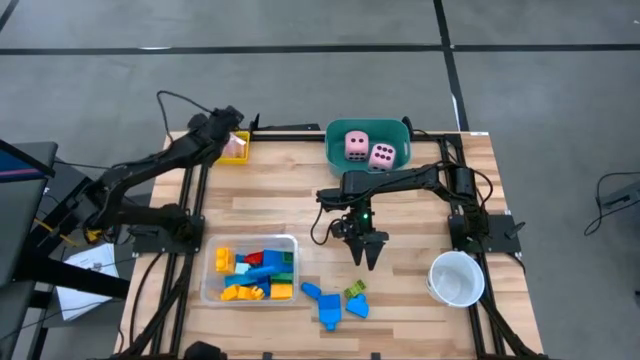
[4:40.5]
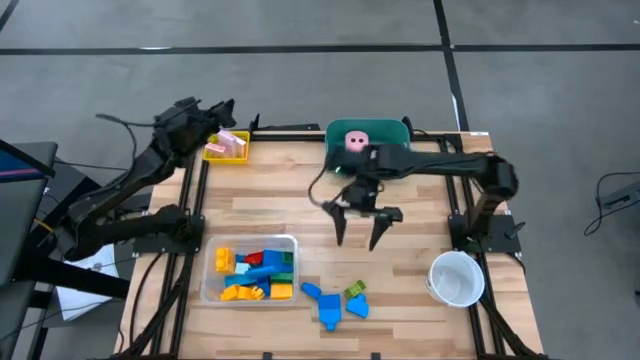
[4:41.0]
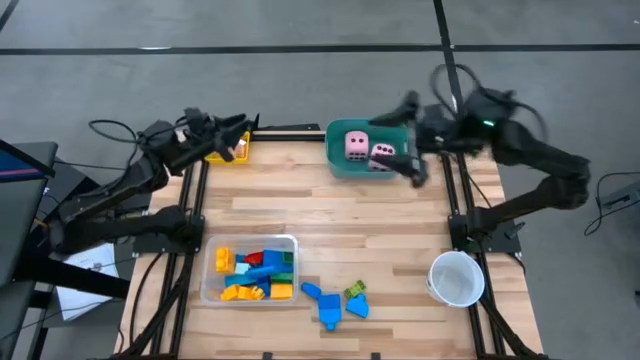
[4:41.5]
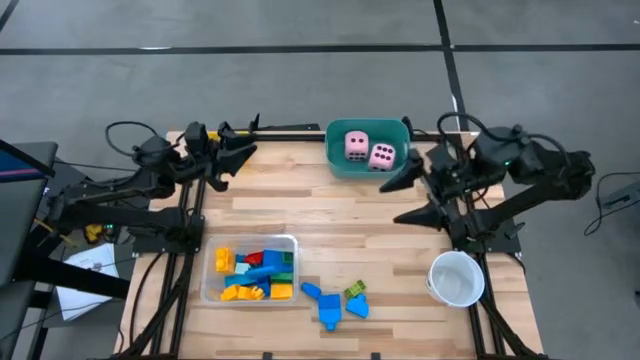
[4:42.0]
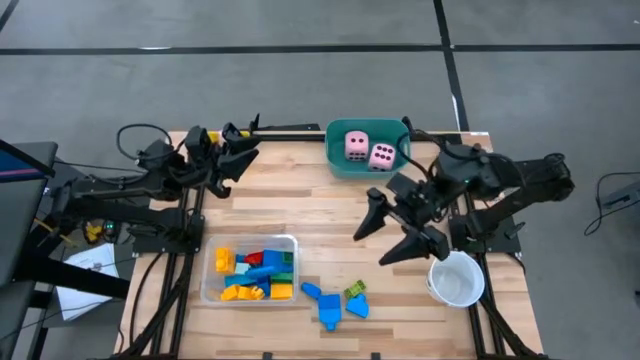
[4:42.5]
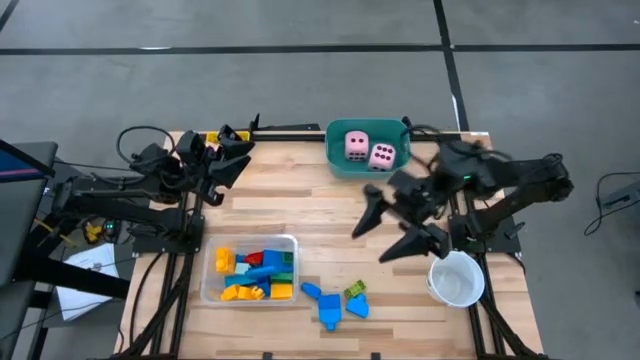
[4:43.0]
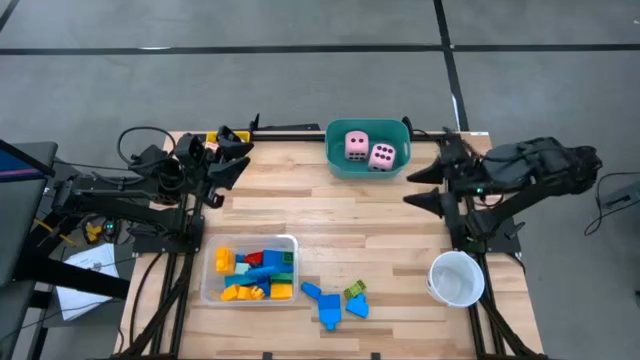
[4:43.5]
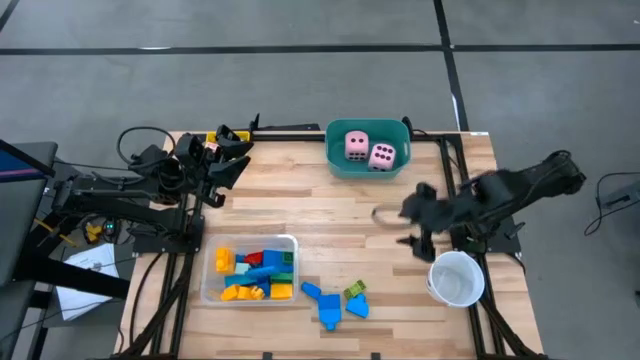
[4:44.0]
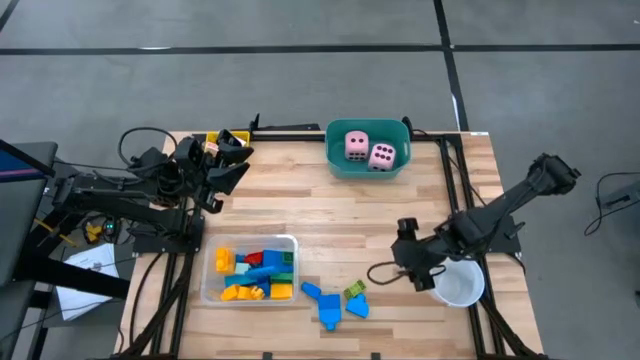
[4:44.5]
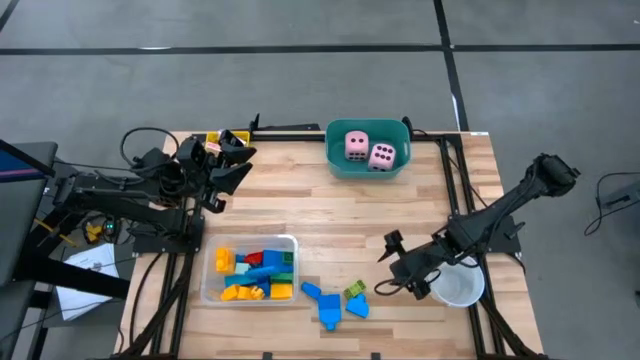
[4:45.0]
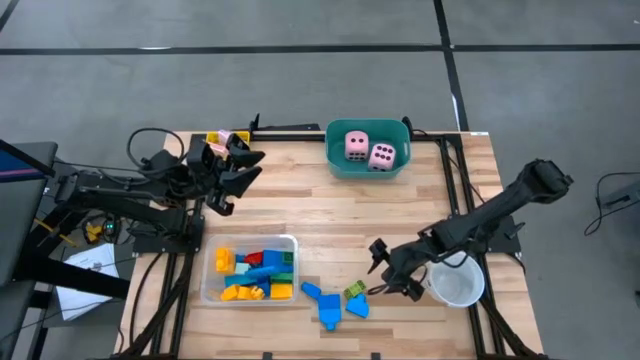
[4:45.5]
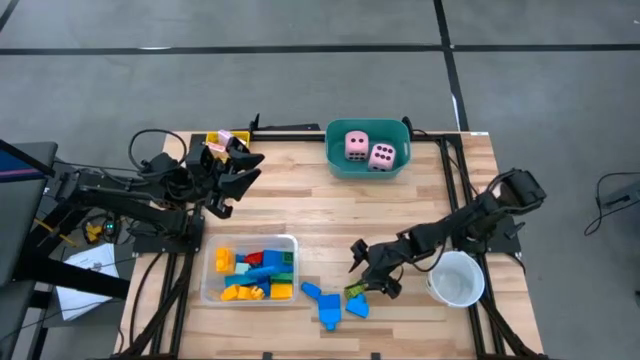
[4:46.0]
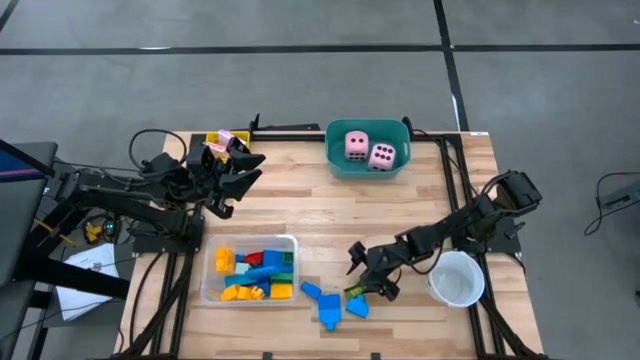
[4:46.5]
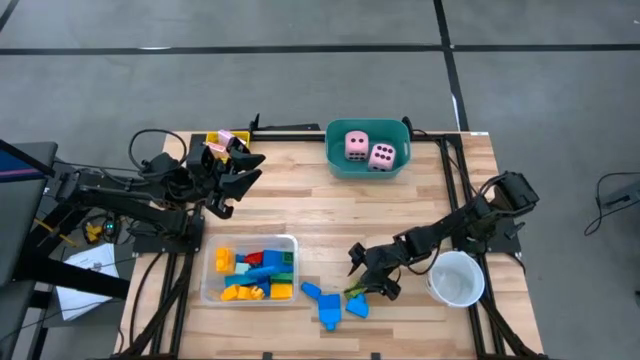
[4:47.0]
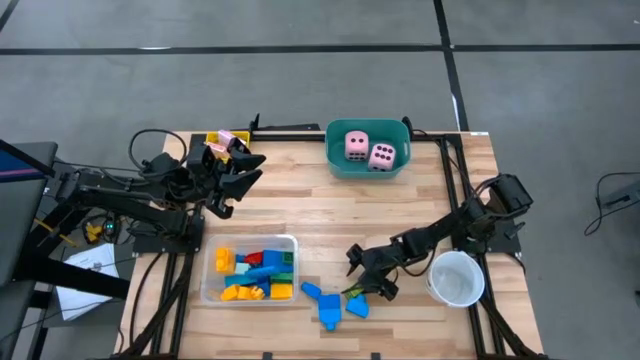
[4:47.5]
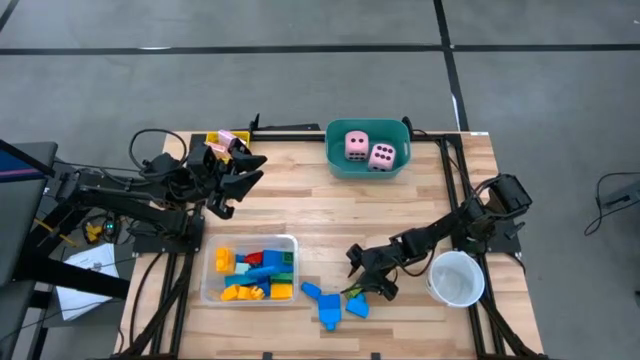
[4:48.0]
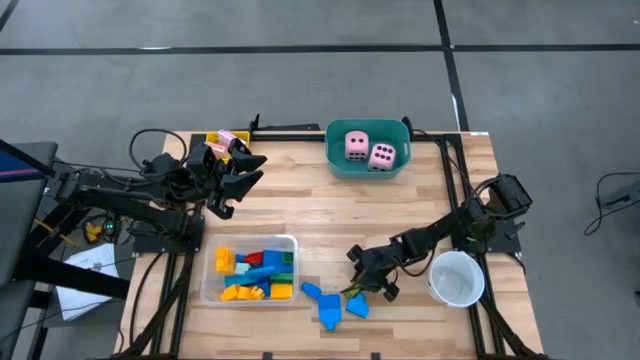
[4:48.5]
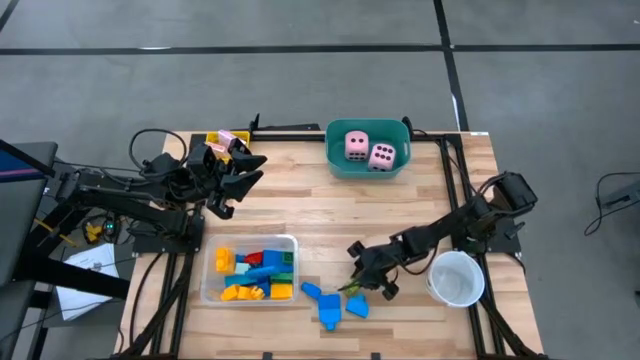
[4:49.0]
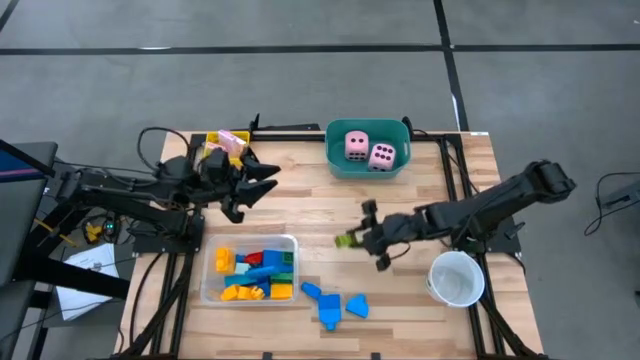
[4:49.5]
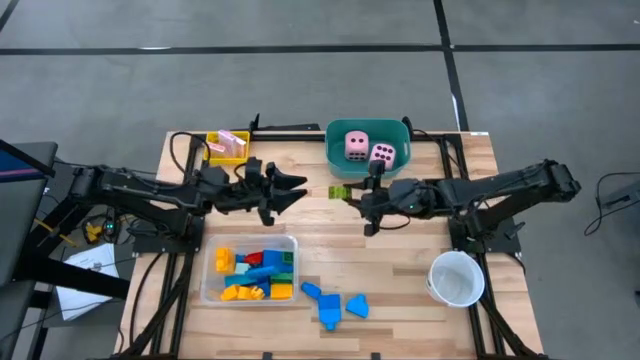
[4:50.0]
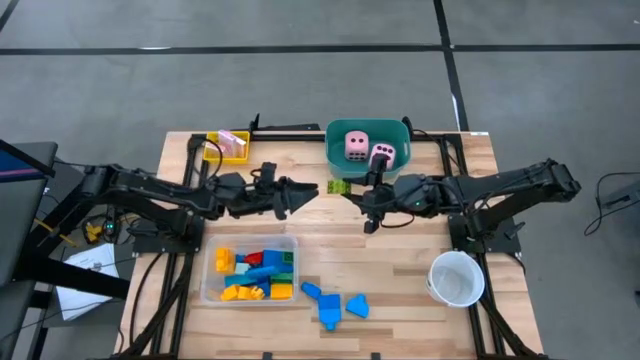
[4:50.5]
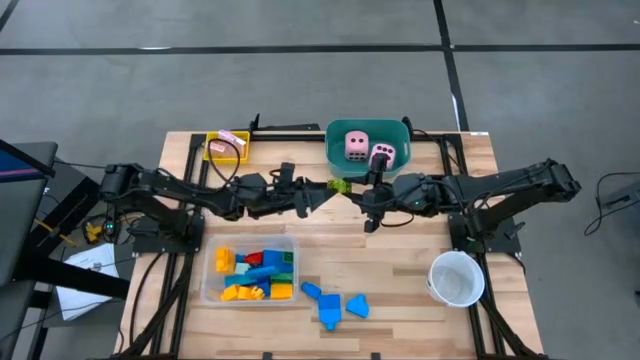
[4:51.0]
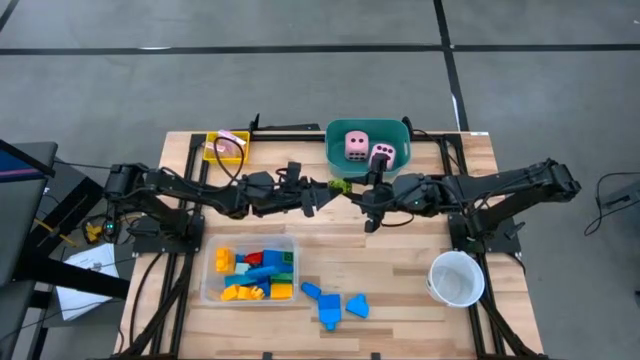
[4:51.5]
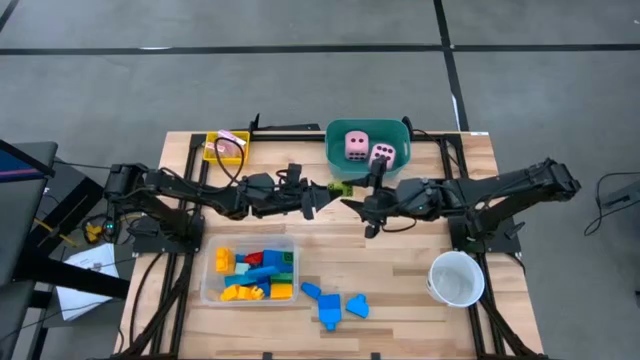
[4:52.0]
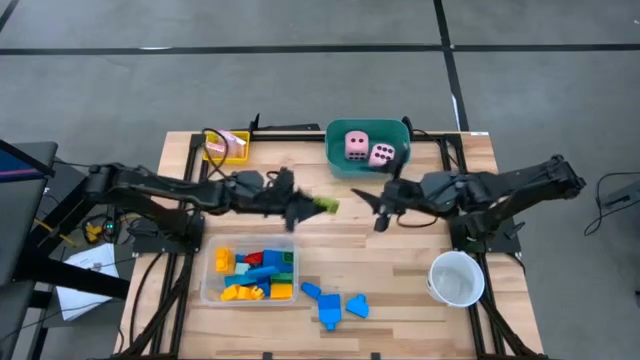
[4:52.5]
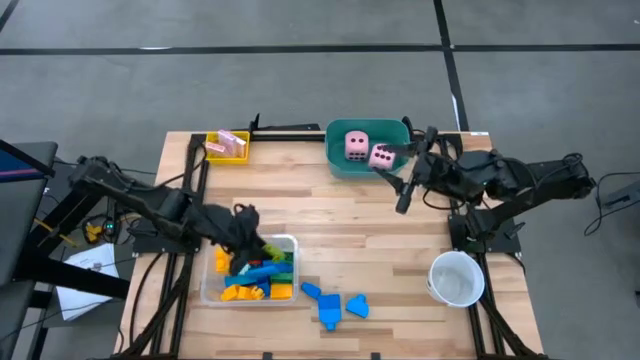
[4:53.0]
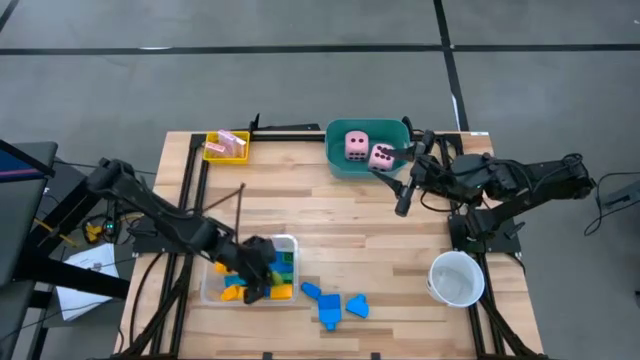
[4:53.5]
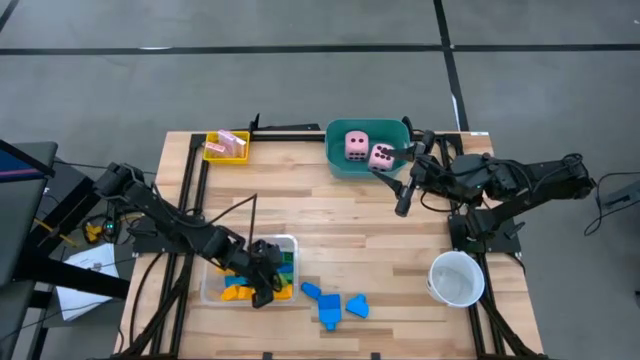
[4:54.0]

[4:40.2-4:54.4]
Task: Pick & Place Toys
Put the light green game piece into the transparent bin

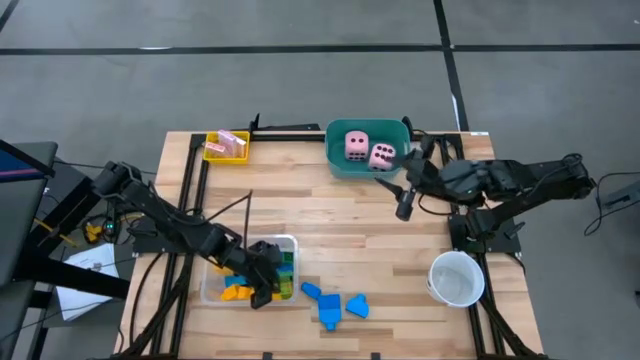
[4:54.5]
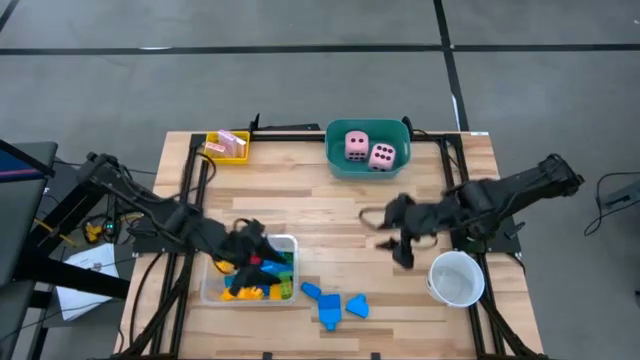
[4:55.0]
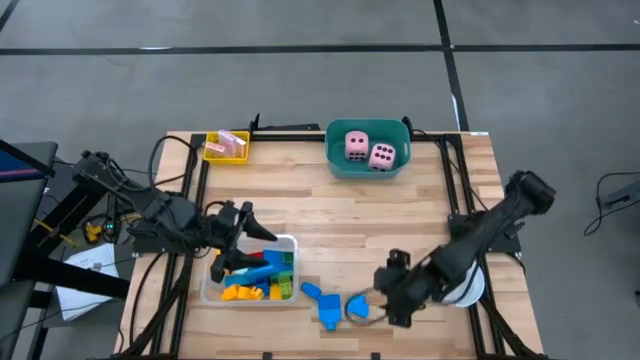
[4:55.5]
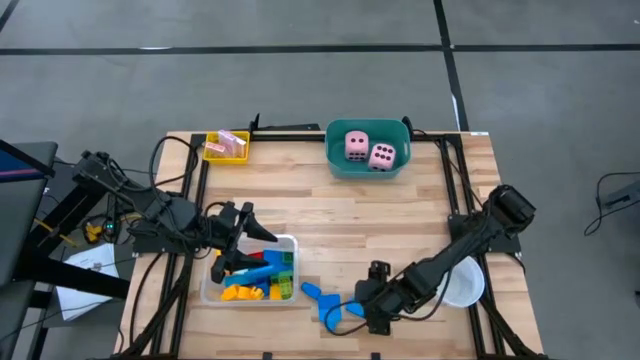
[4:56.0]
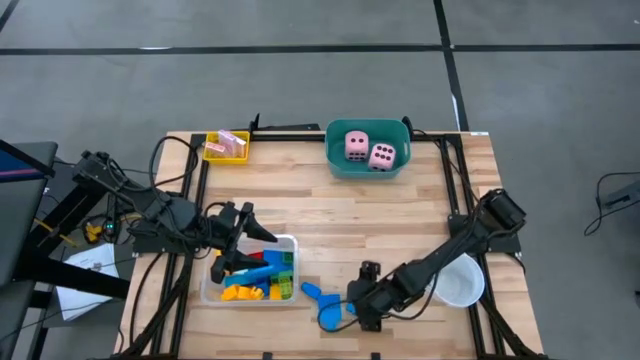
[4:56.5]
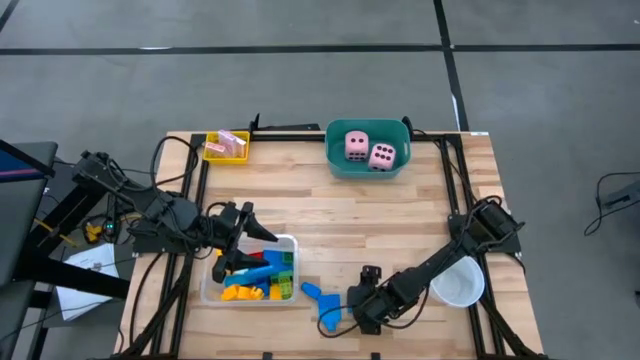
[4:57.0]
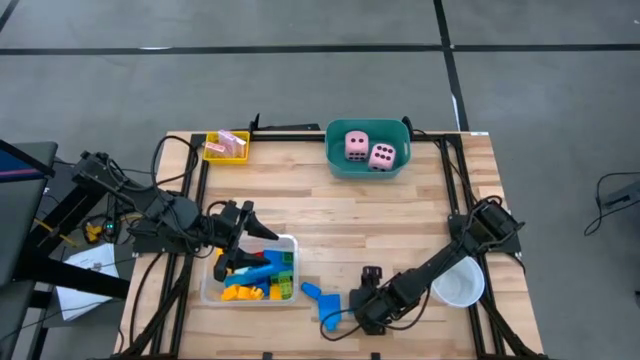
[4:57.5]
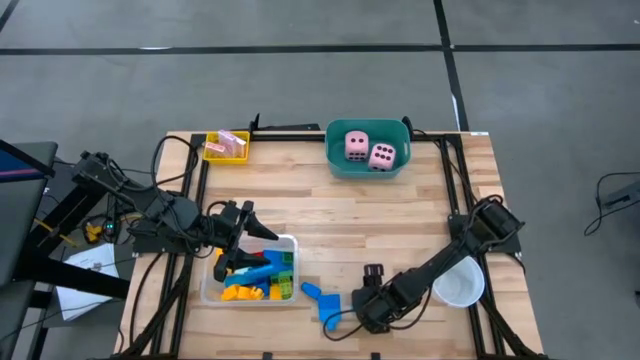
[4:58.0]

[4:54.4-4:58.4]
Put the blue game piece into the transparent bin

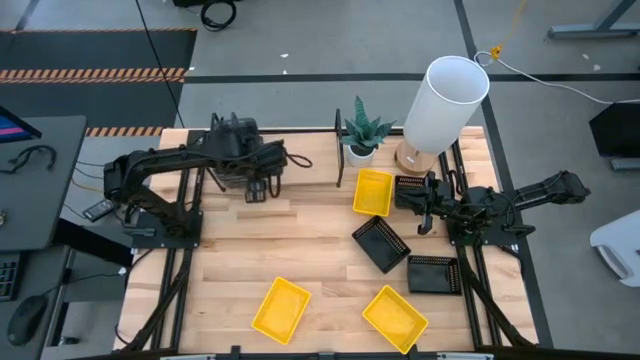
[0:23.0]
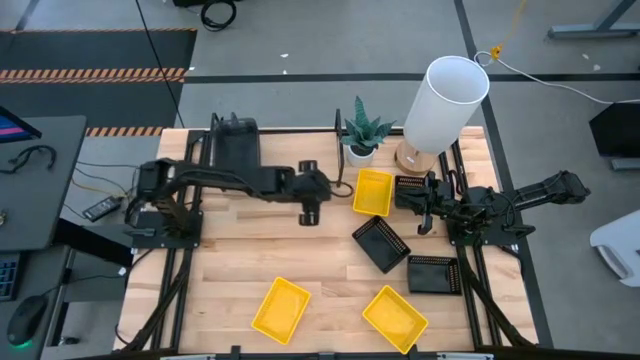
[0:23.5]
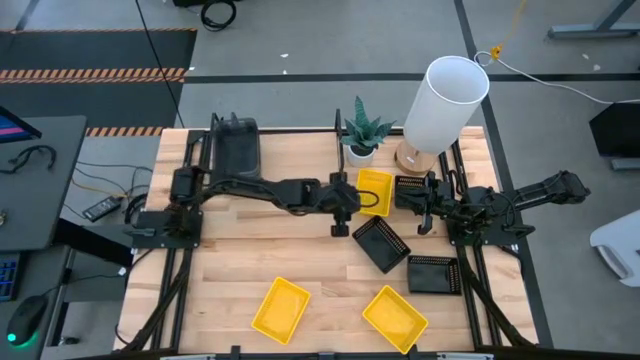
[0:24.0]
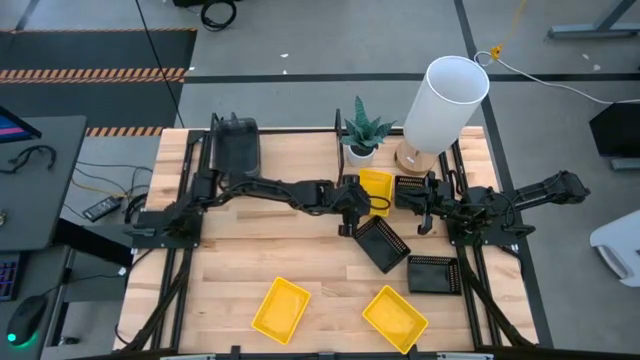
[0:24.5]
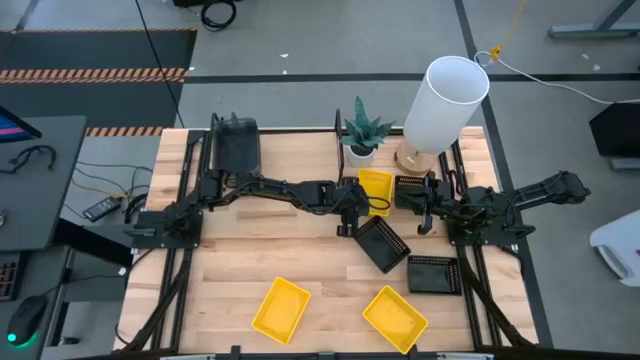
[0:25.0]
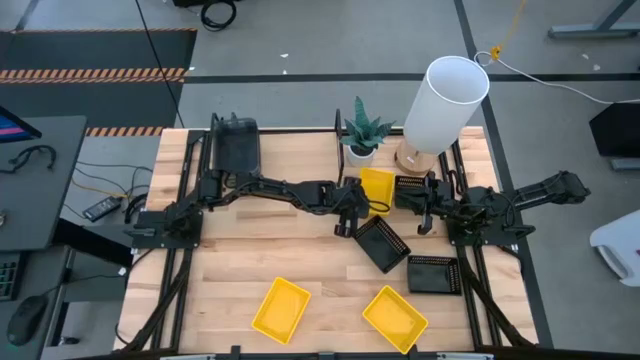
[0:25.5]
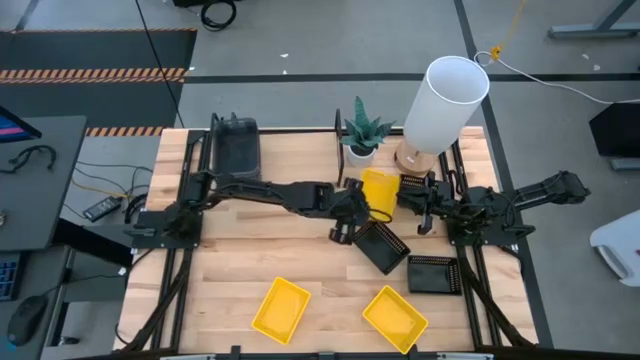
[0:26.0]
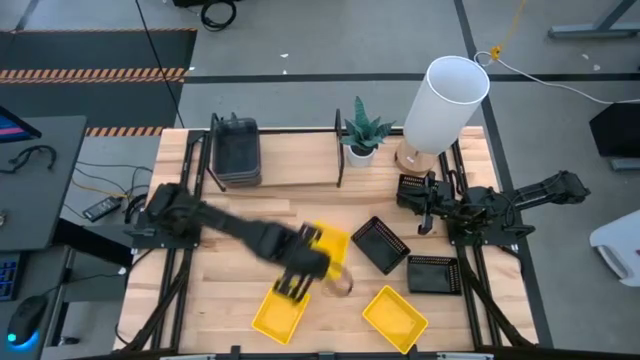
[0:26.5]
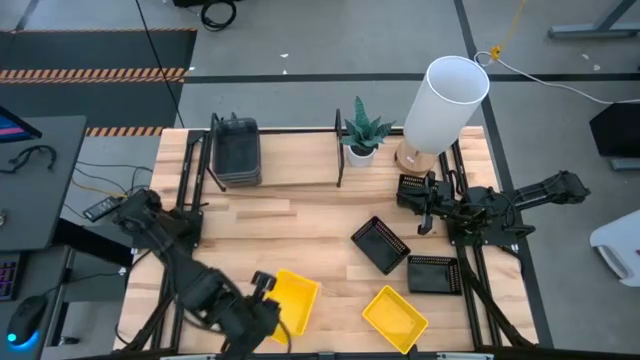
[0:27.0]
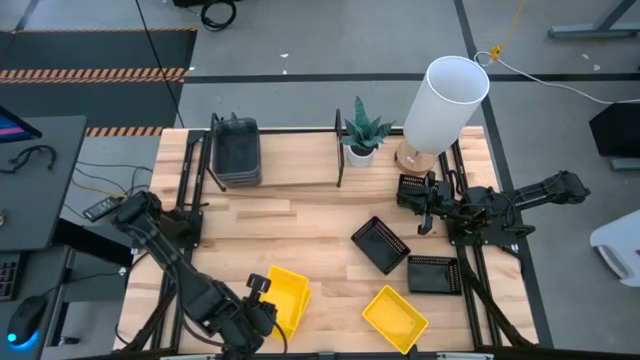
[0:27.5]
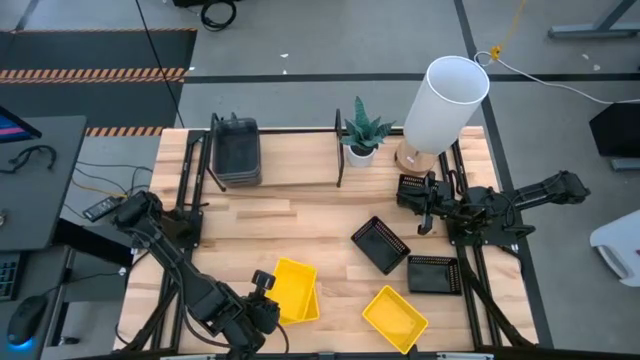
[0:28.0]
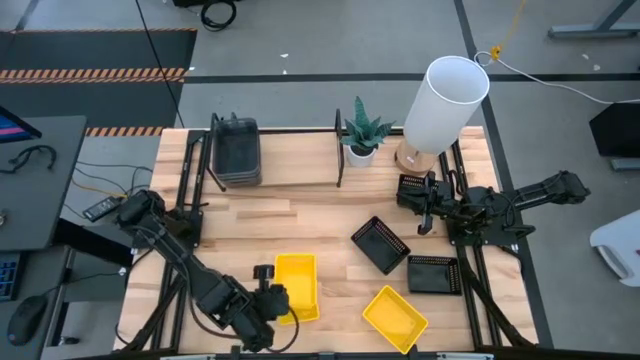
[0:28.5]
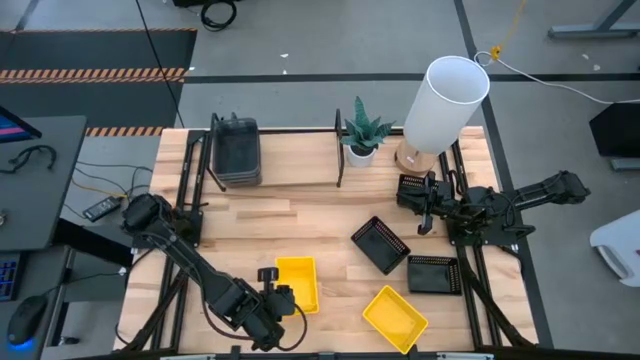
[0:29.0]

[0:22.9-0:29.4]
Task: Stack baskets on shelf by color
Stack the top yellow bin on the left yellow bin
